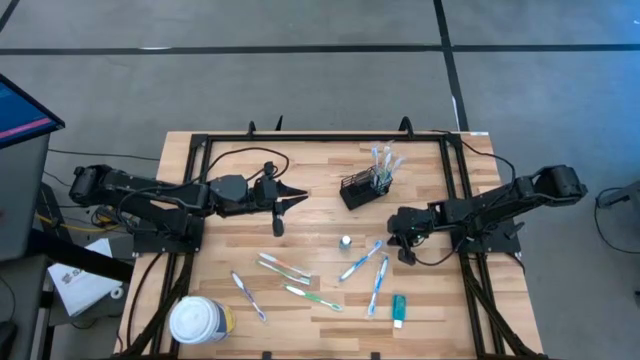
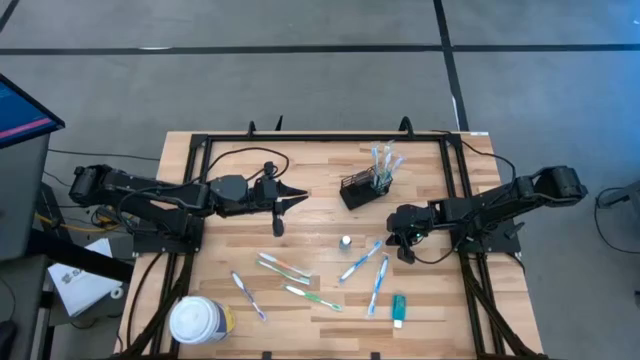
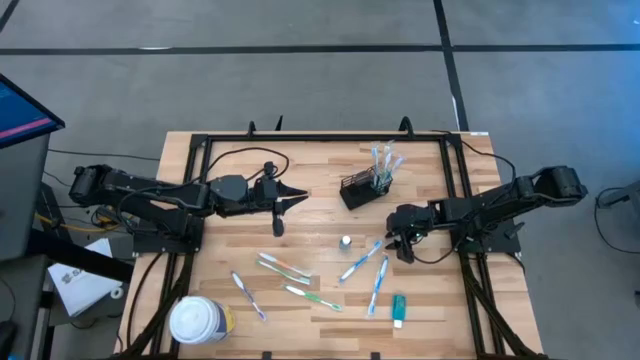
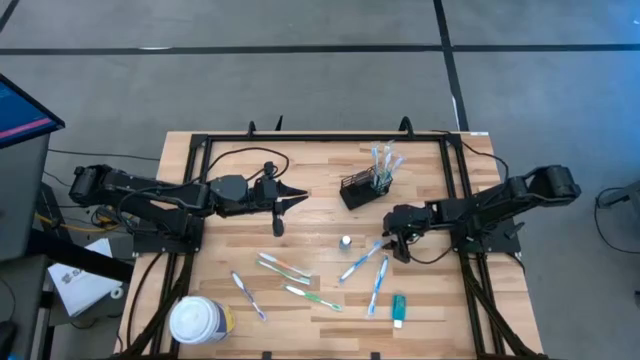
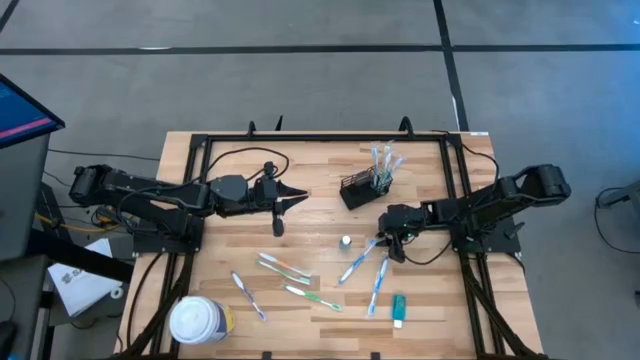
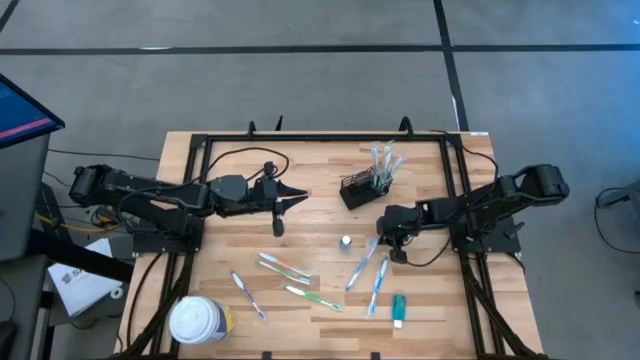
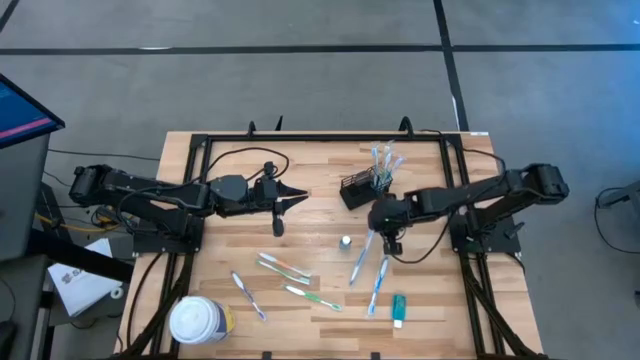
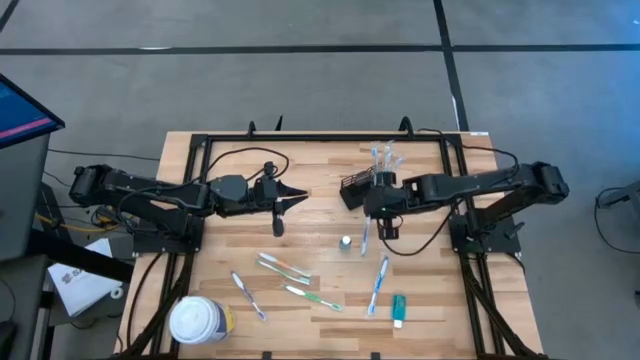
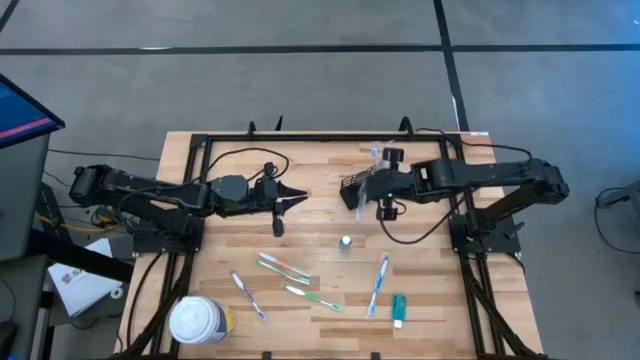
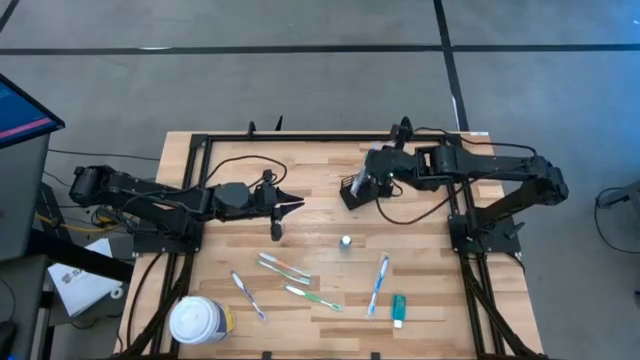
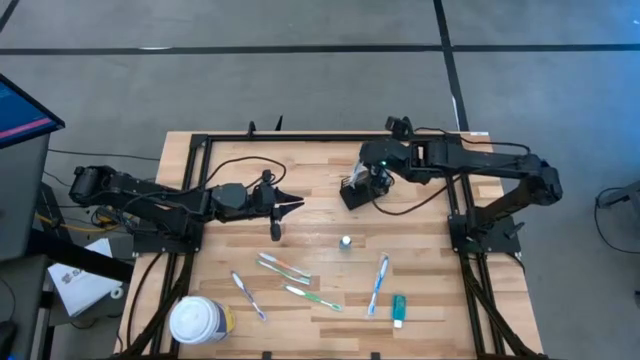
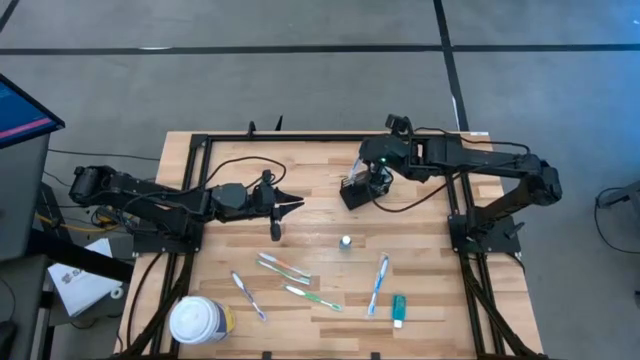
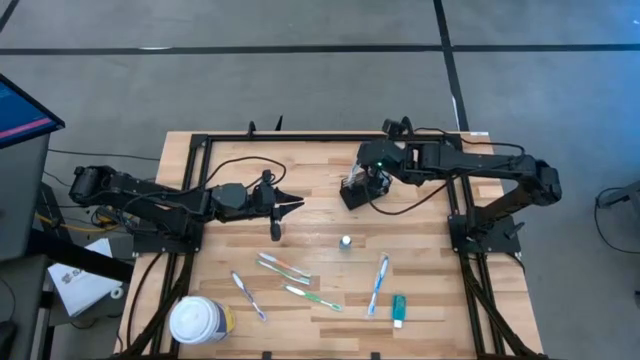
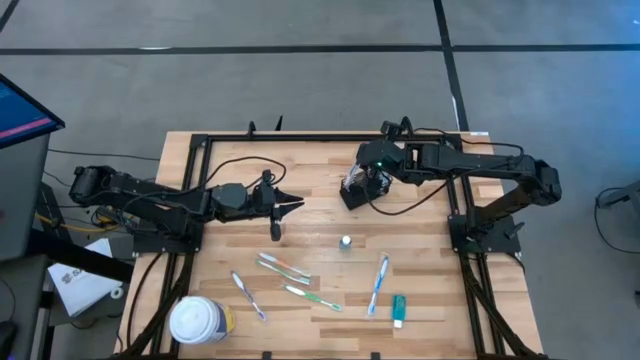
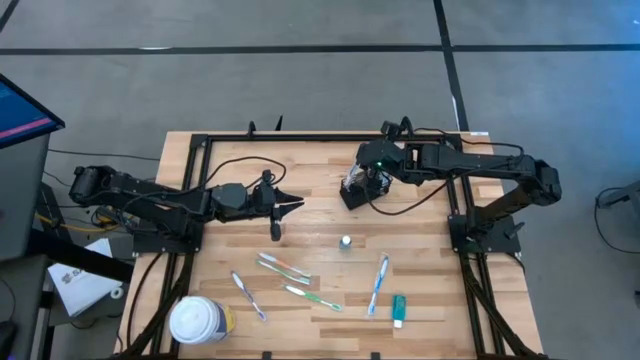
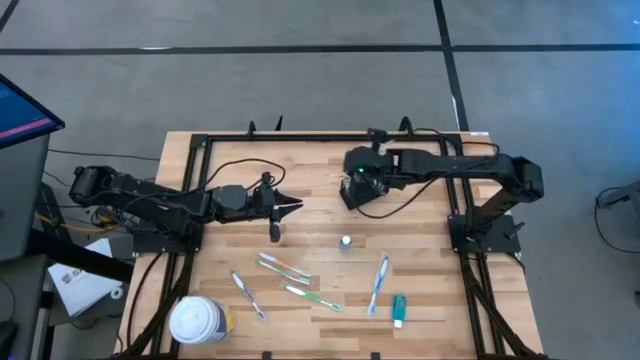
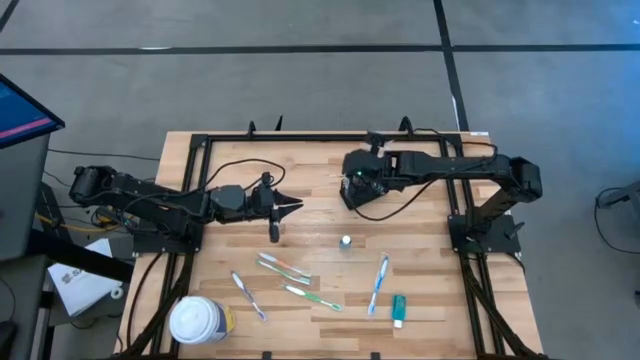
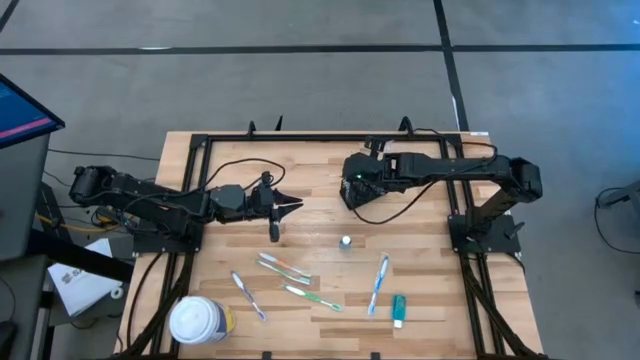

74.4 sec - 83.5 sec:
Task: Pick & Place toothbrushing station
Put the blue toothbrush into the mesh organizer

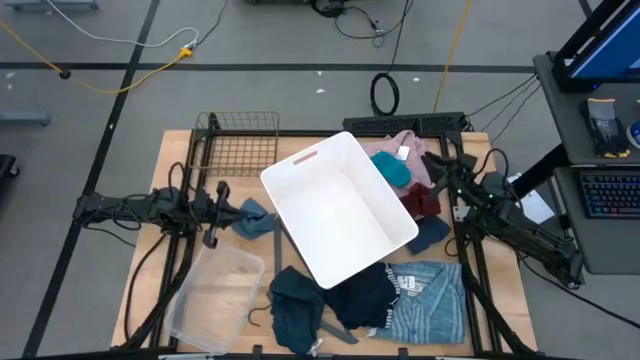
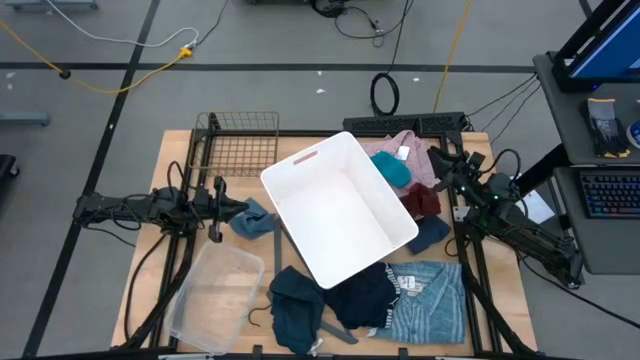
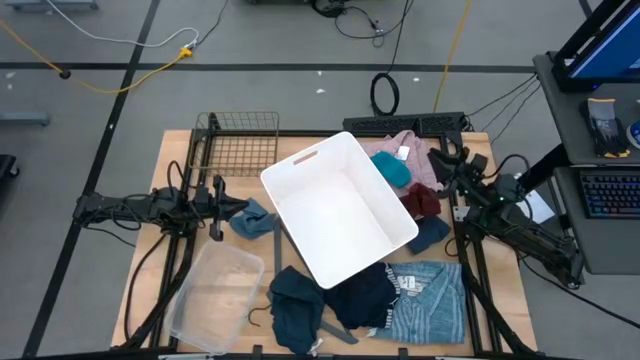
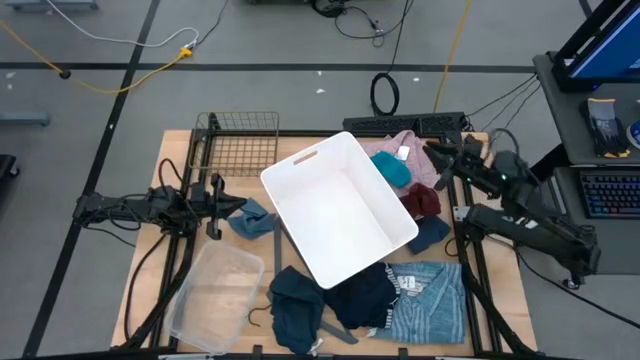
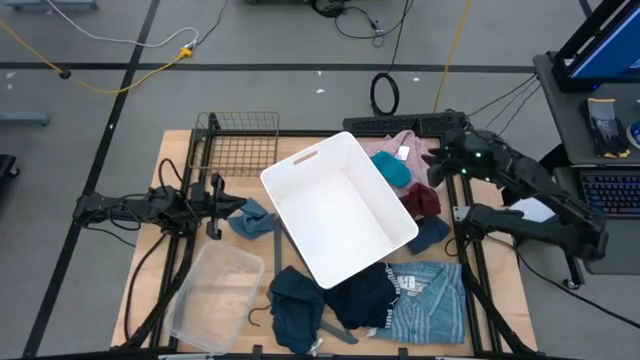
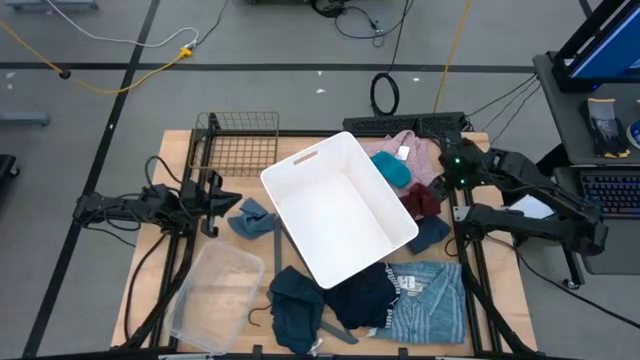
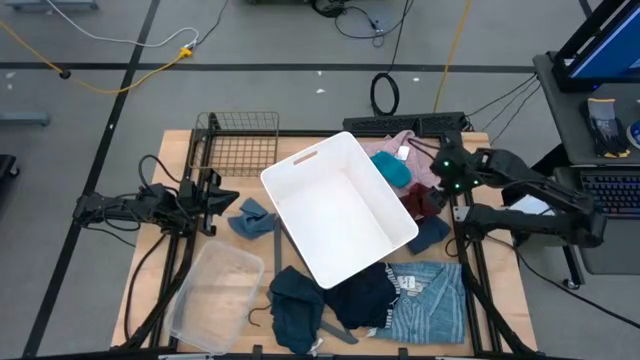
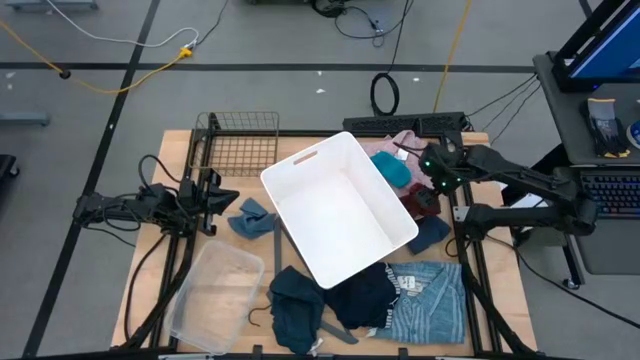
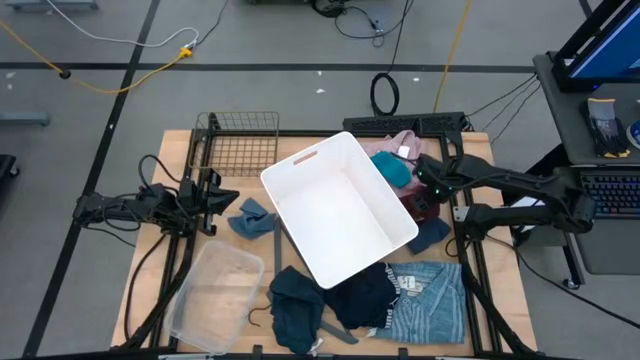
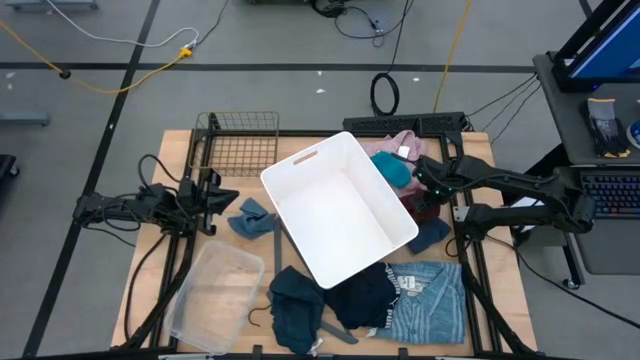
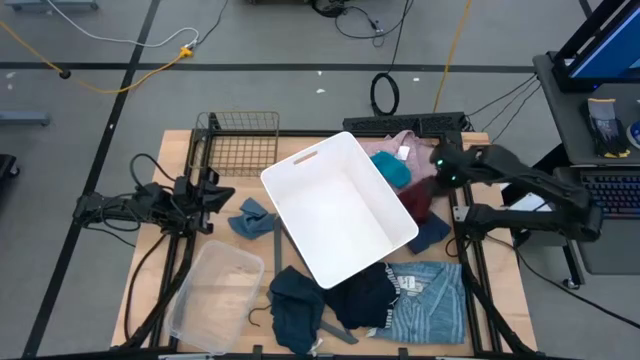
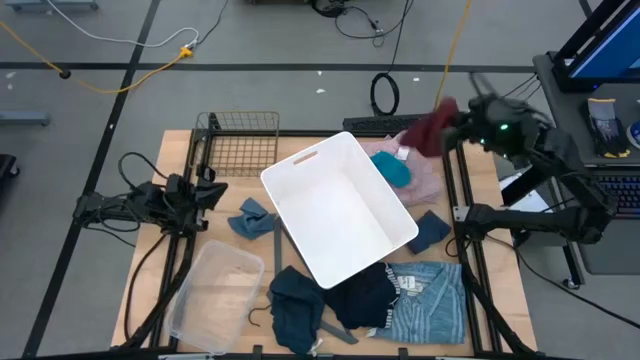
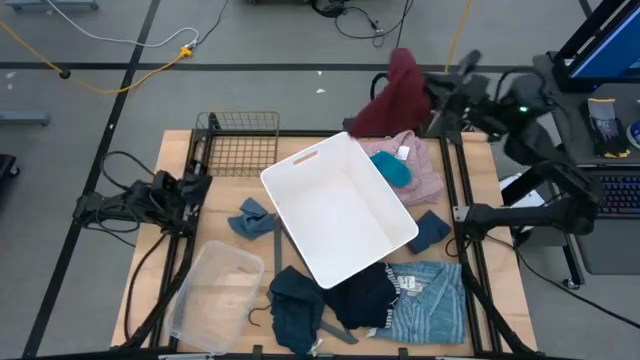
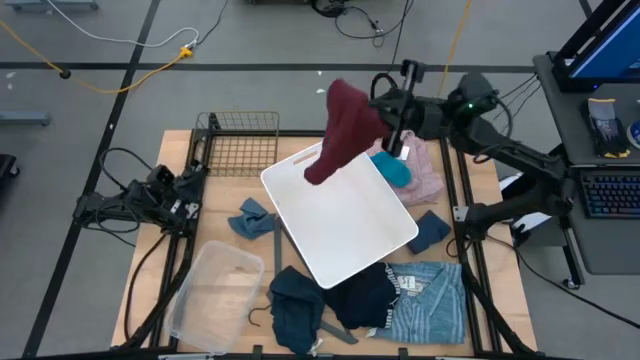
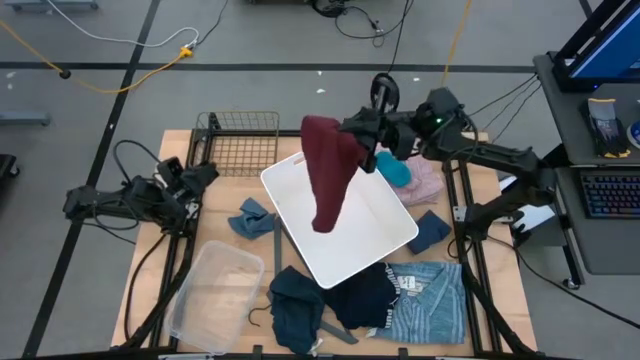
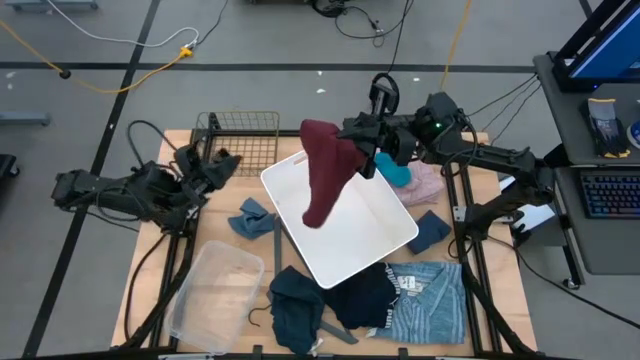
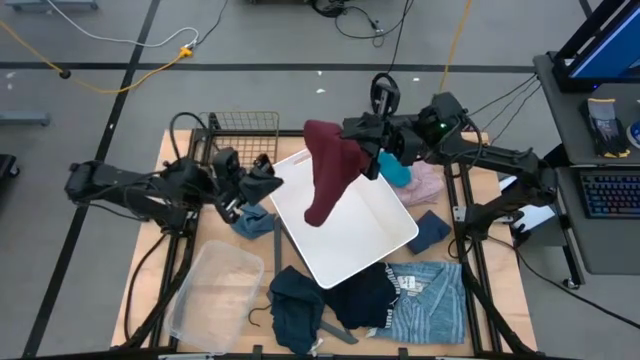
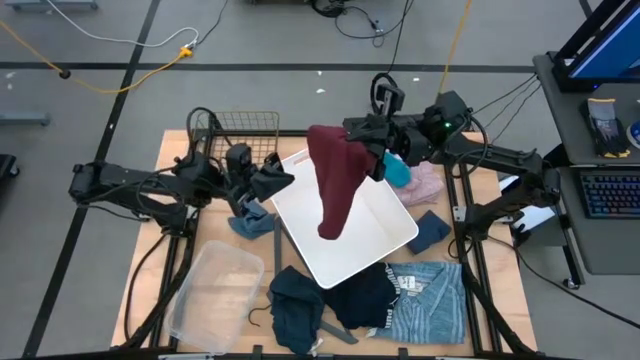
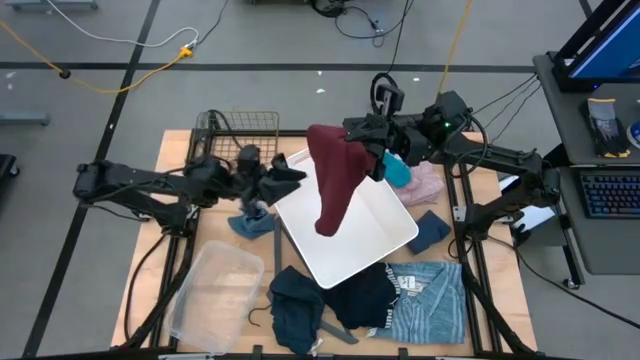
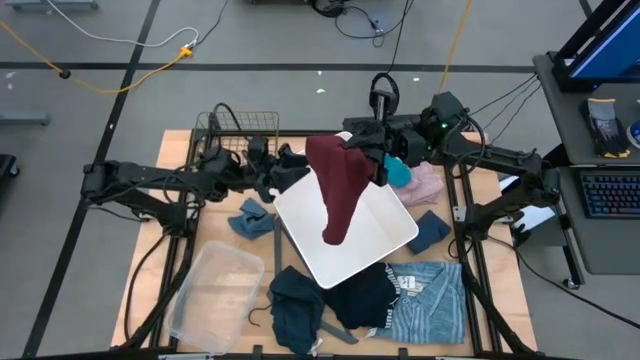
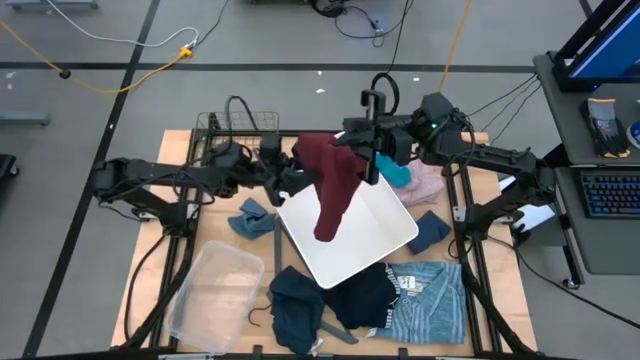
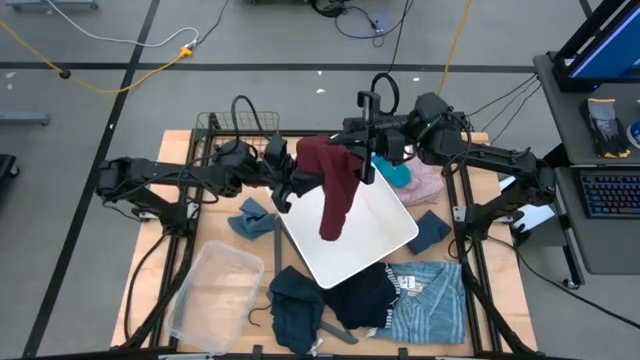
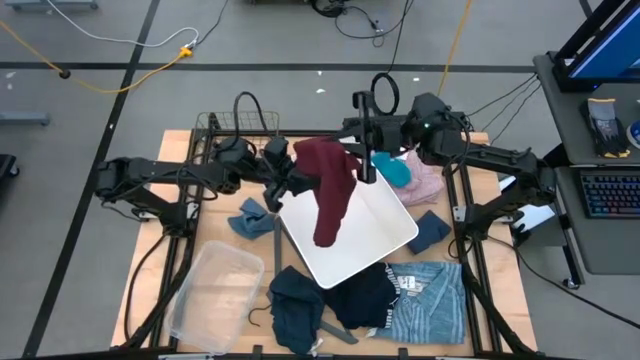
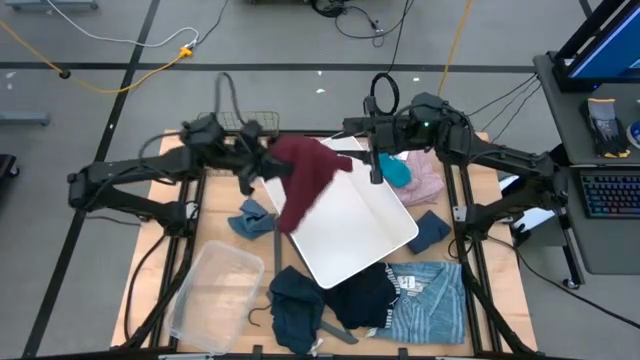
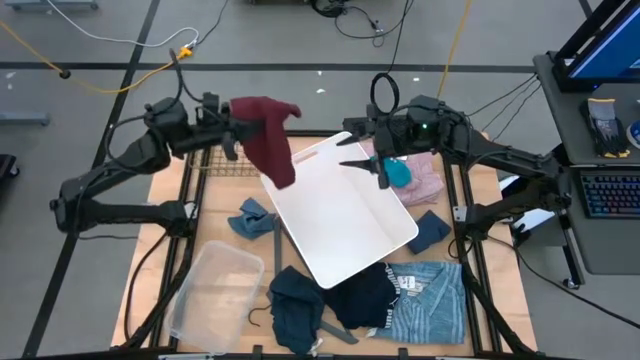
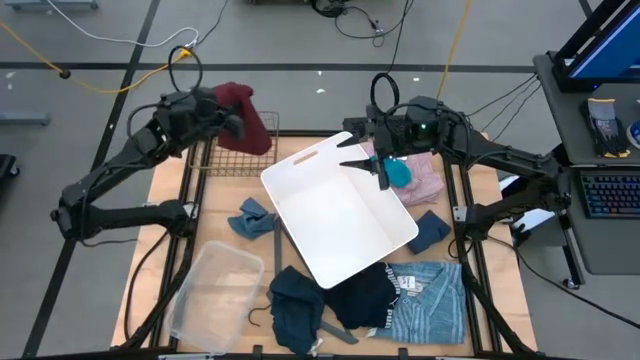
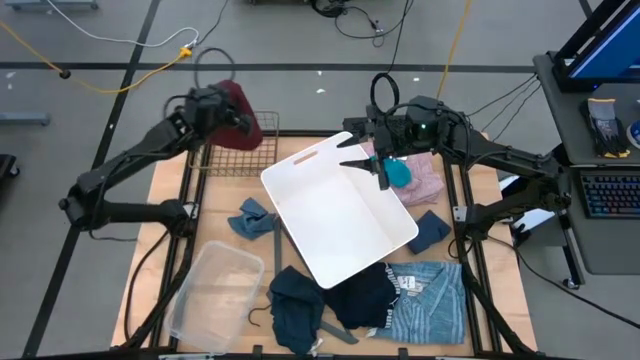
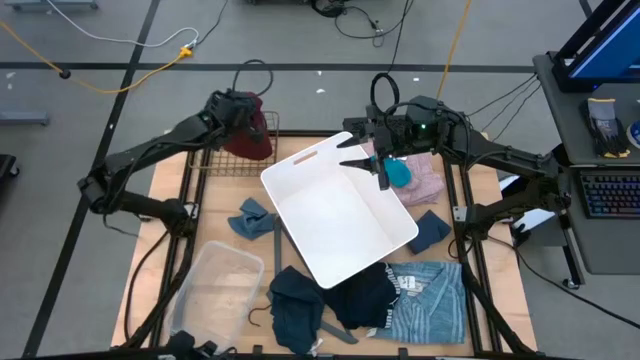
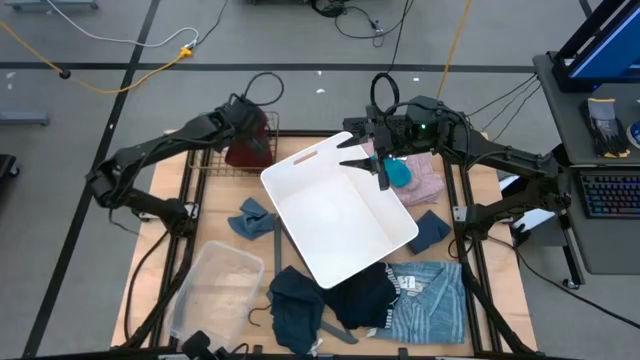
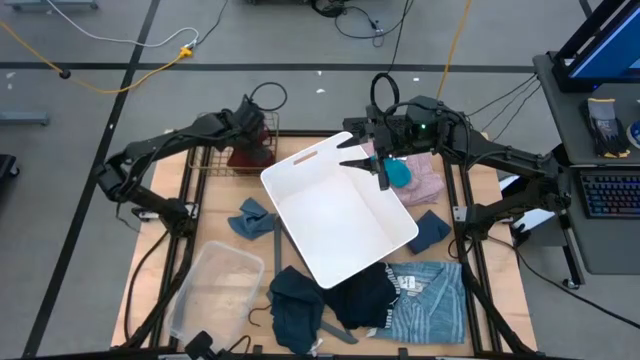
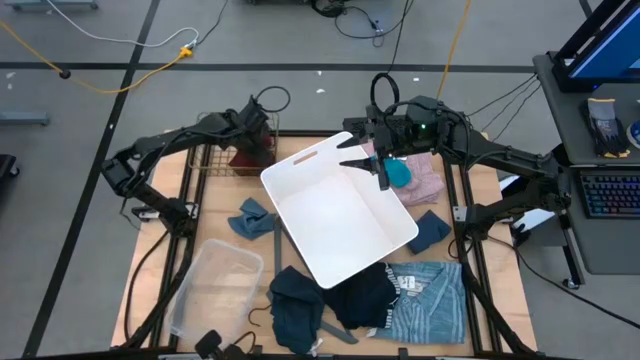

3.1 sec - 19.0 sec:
Task: Pick & Place Cloths
Put the red underwear into the mesh basket
